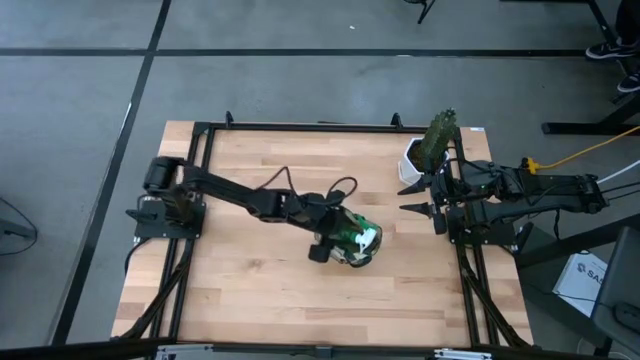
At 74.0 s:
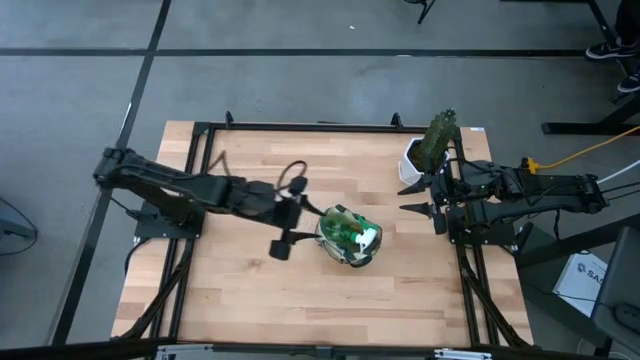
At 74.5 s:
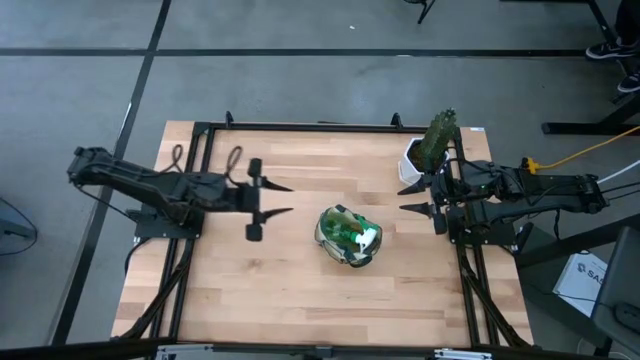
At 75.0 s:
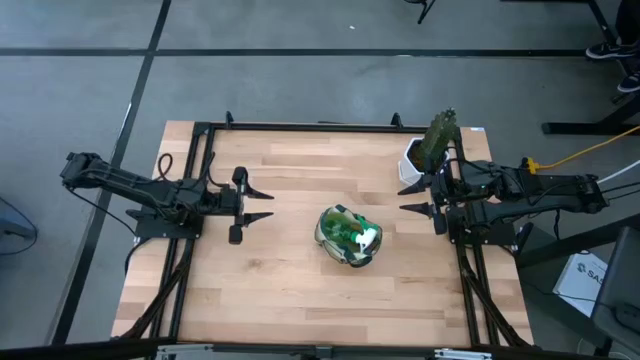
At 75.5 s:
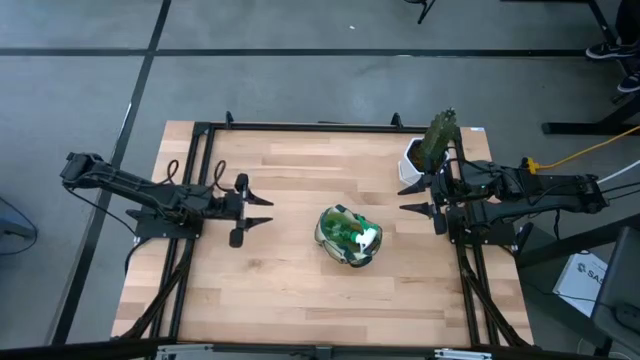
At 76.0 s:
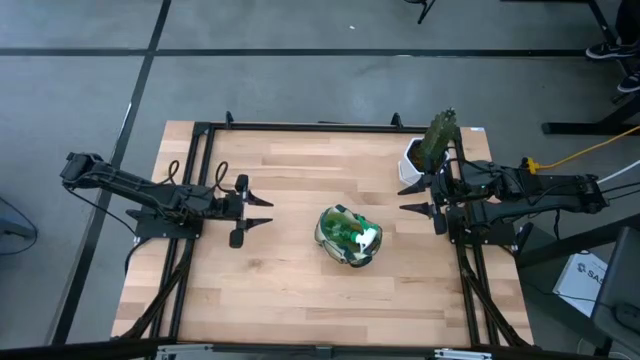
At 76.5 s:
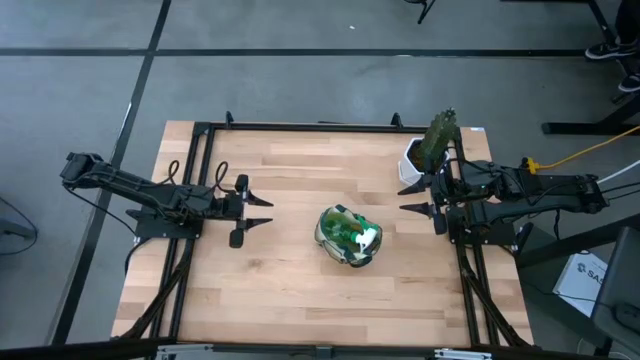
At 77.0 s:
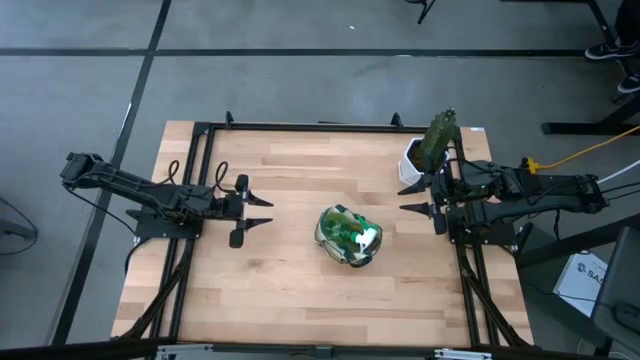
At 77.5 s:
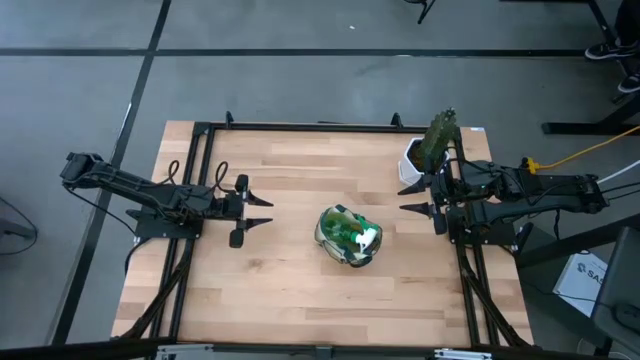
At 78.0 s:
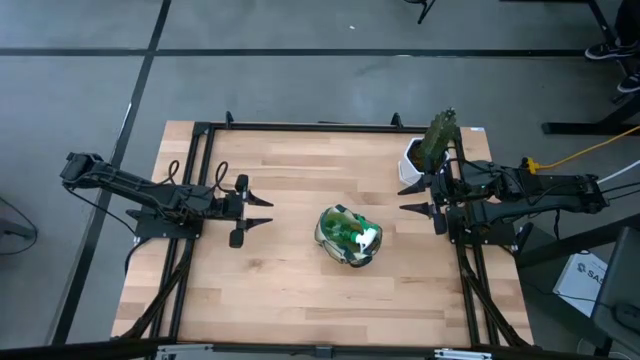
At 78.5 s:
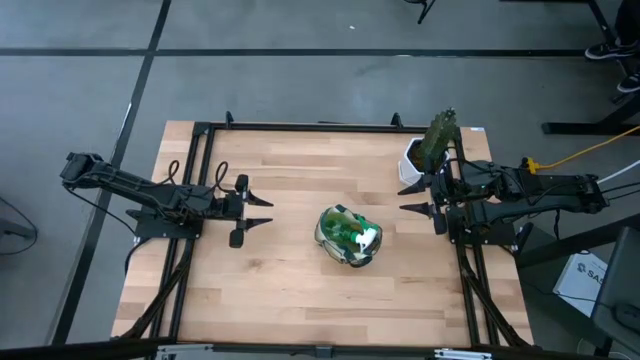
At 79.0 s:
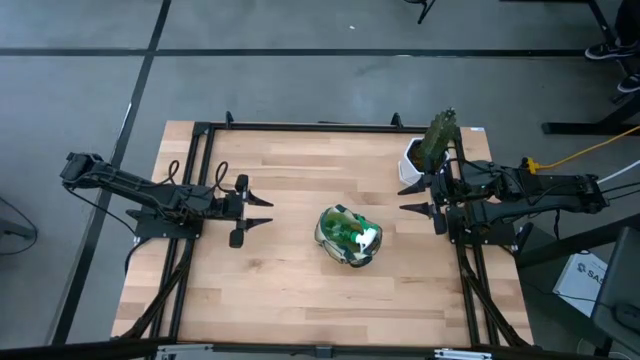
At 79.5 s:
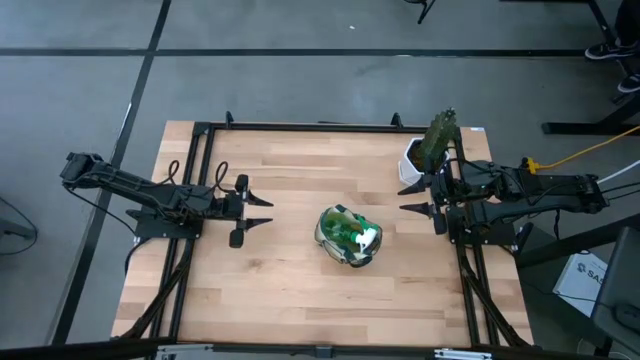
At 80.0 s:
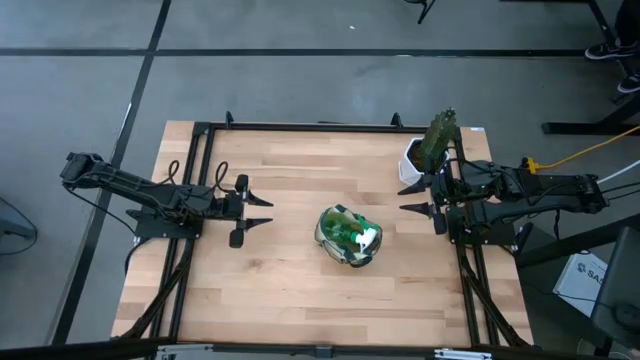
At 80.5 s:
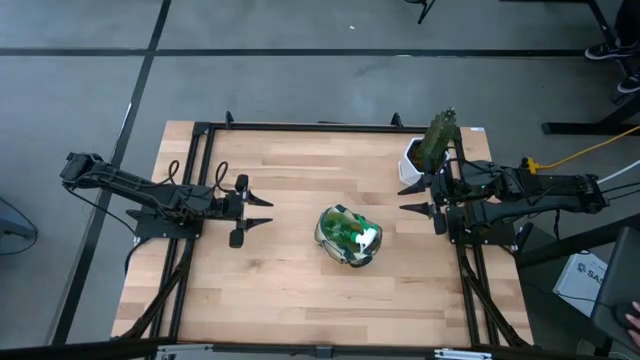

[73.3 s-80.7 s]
Task: Pick & Place Garden tools in Gardening bag
Return to Home Position

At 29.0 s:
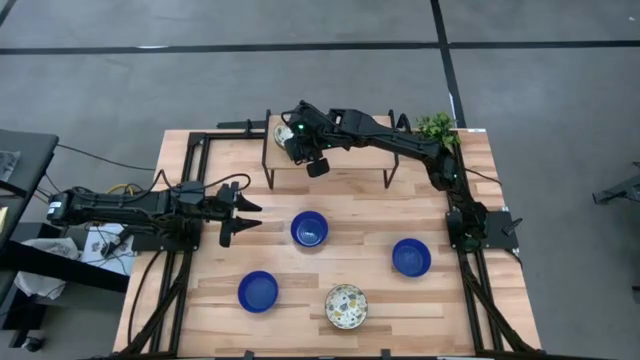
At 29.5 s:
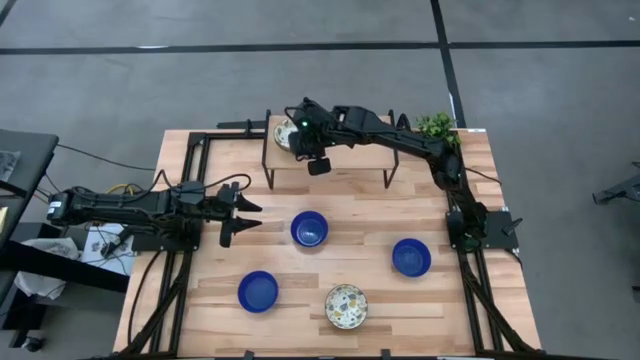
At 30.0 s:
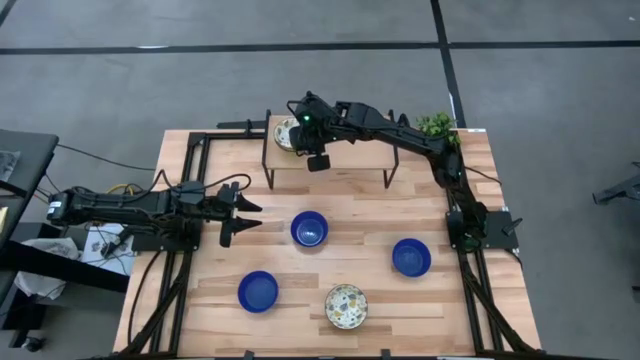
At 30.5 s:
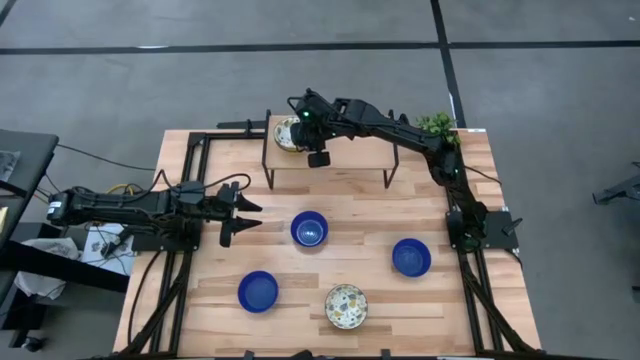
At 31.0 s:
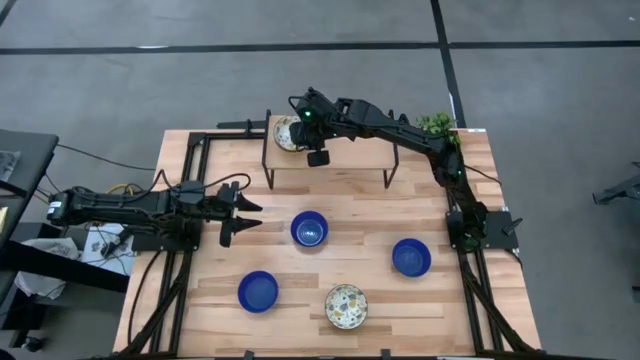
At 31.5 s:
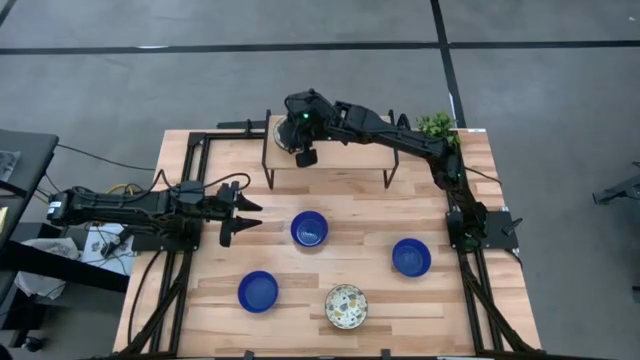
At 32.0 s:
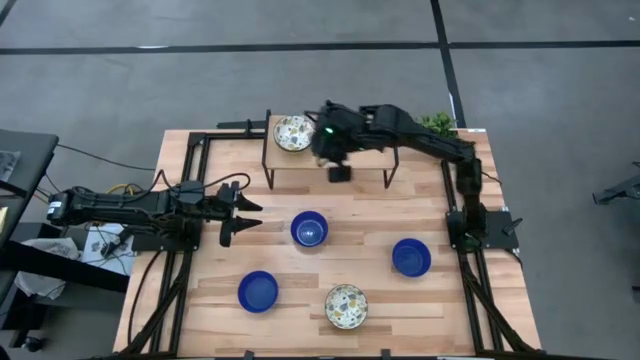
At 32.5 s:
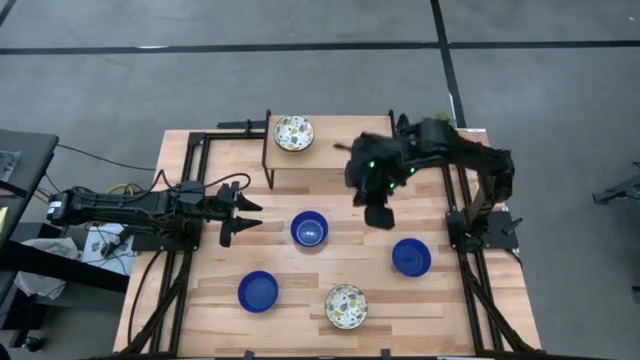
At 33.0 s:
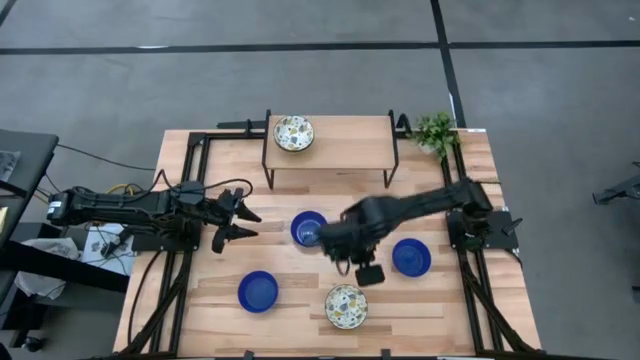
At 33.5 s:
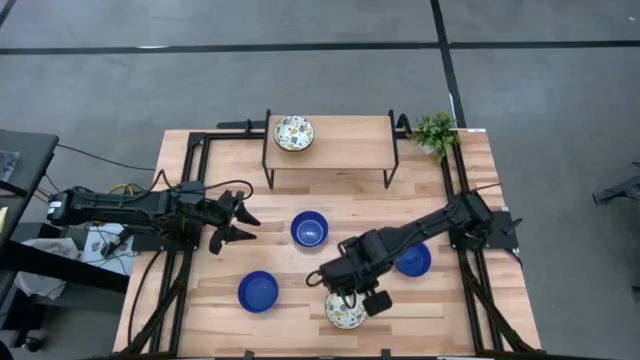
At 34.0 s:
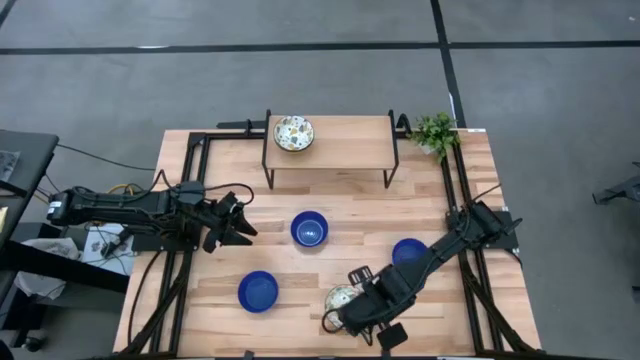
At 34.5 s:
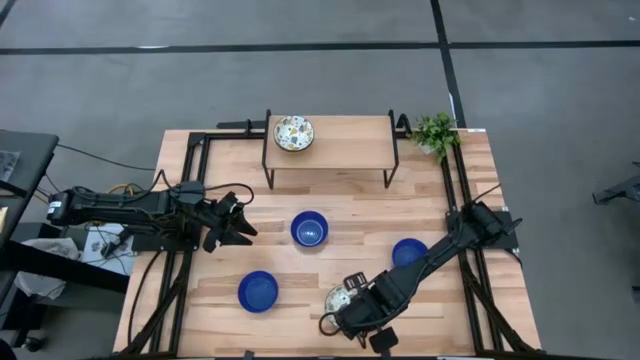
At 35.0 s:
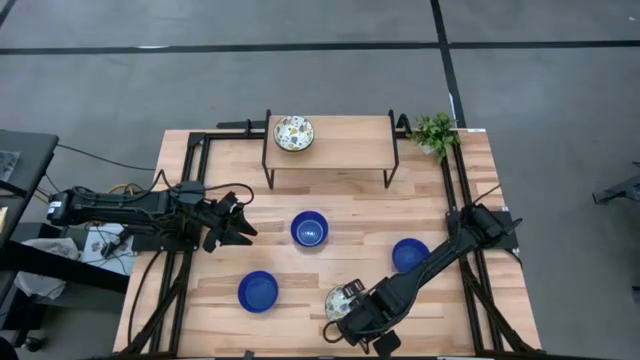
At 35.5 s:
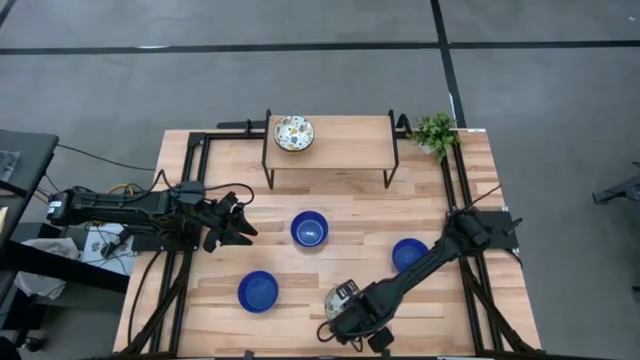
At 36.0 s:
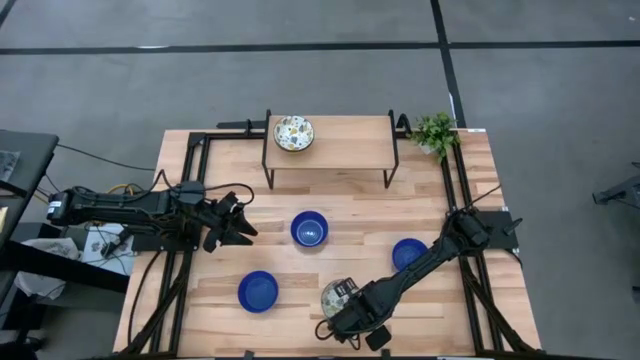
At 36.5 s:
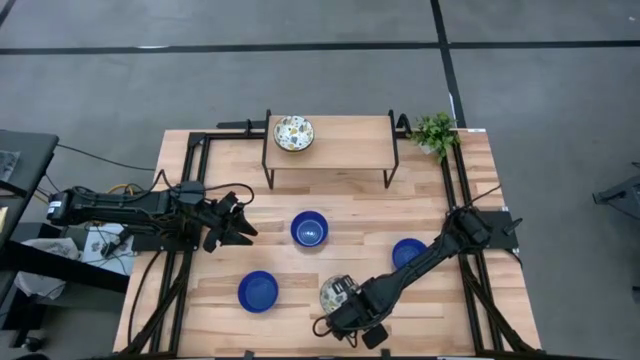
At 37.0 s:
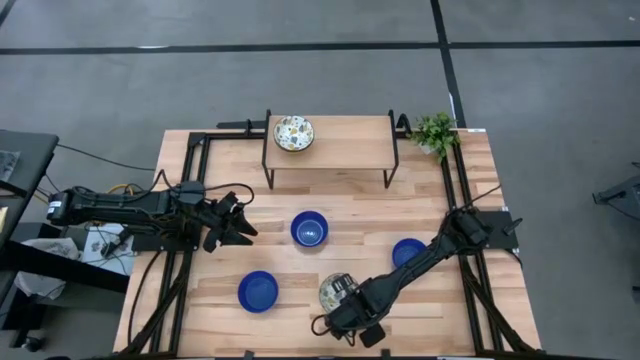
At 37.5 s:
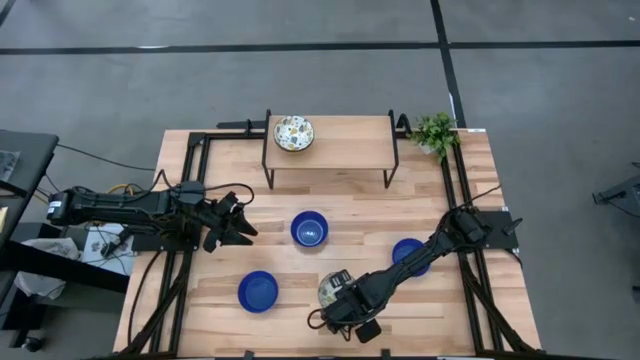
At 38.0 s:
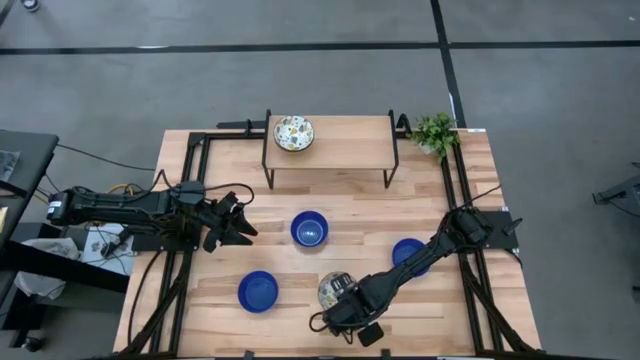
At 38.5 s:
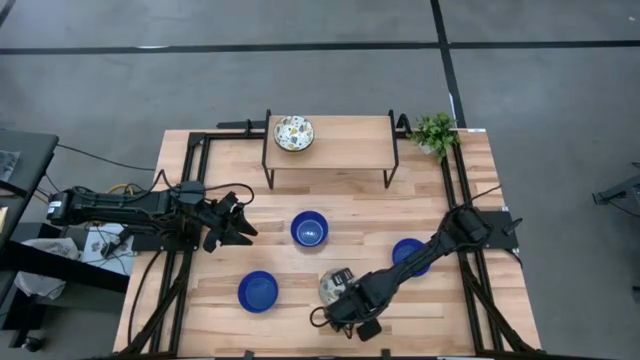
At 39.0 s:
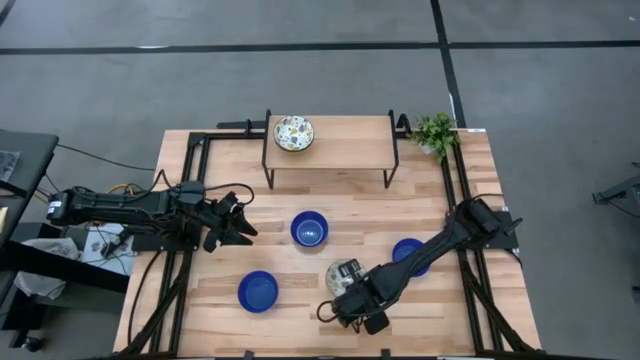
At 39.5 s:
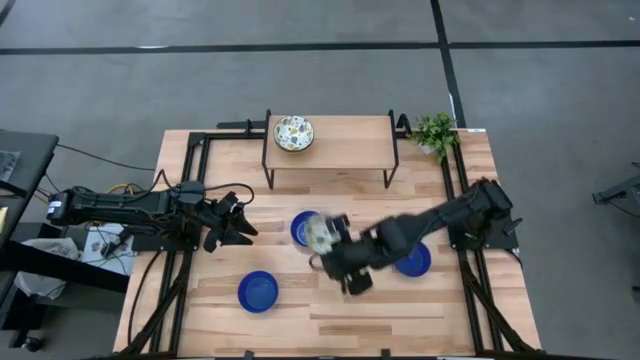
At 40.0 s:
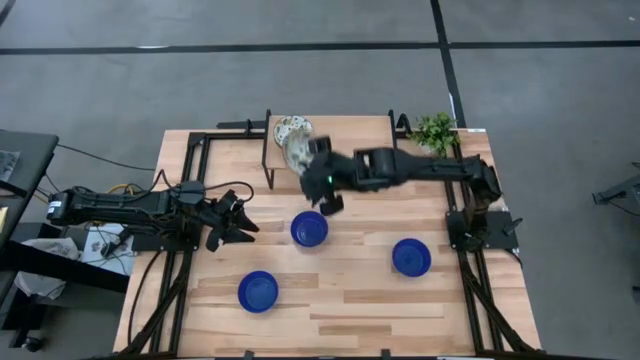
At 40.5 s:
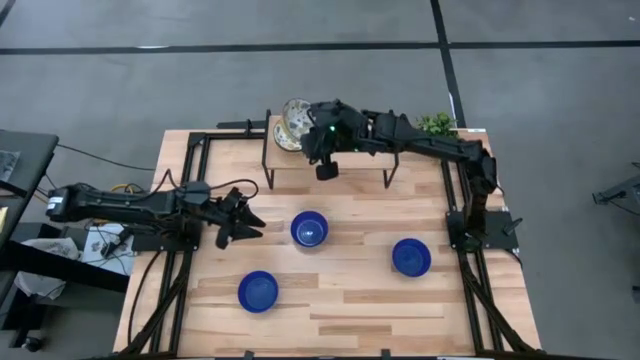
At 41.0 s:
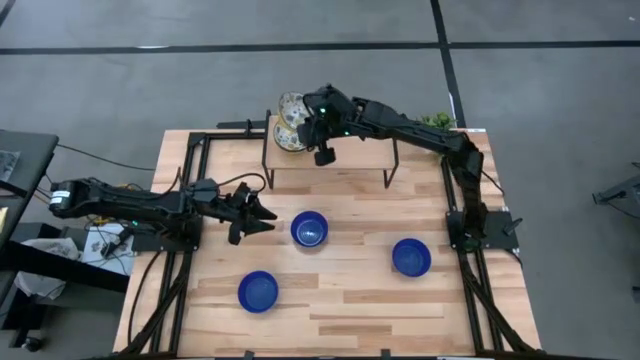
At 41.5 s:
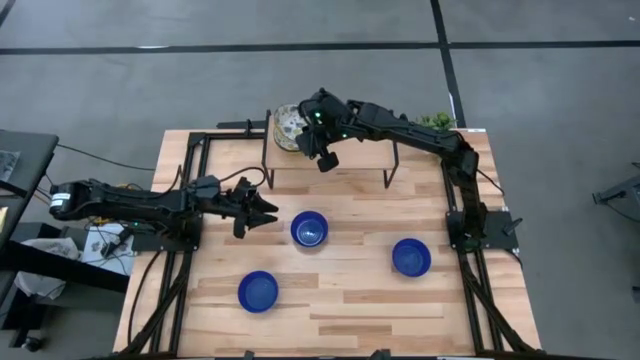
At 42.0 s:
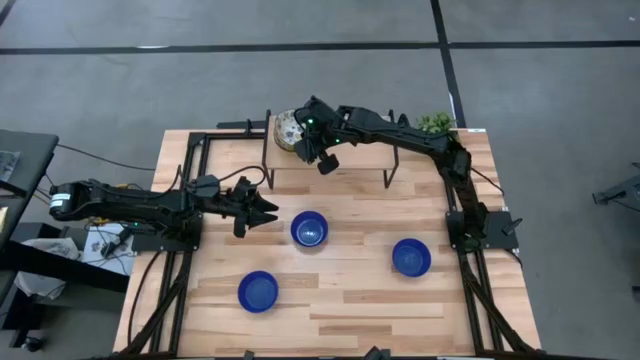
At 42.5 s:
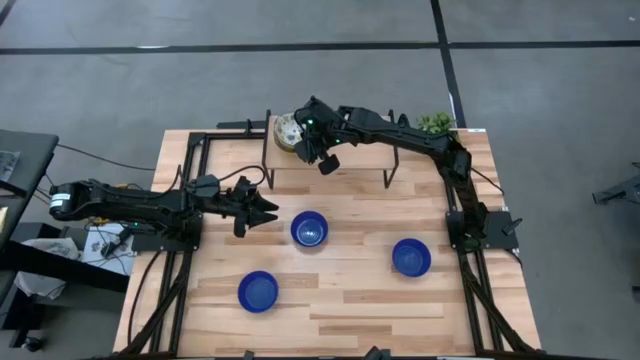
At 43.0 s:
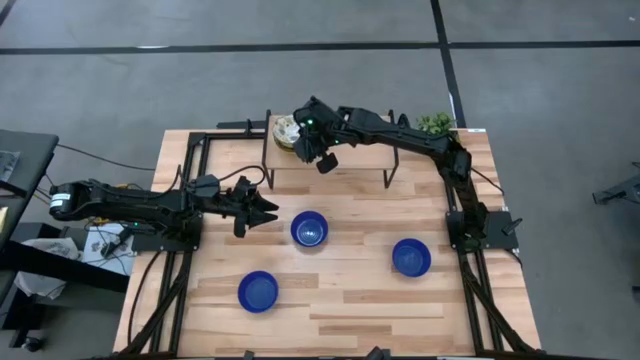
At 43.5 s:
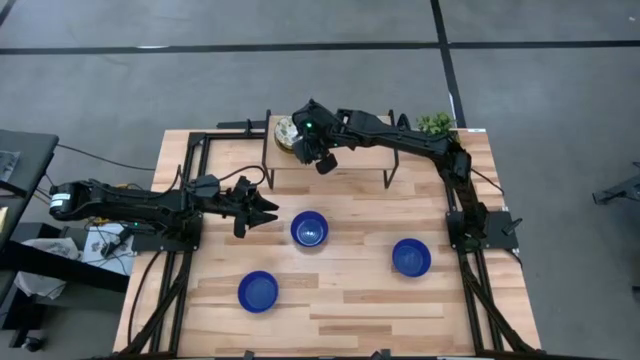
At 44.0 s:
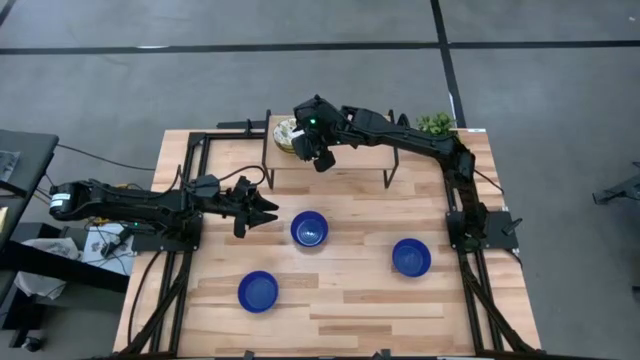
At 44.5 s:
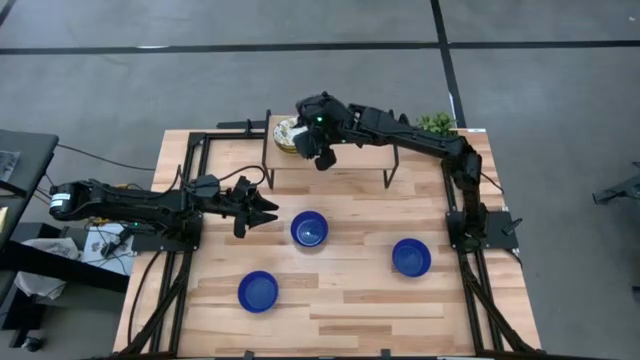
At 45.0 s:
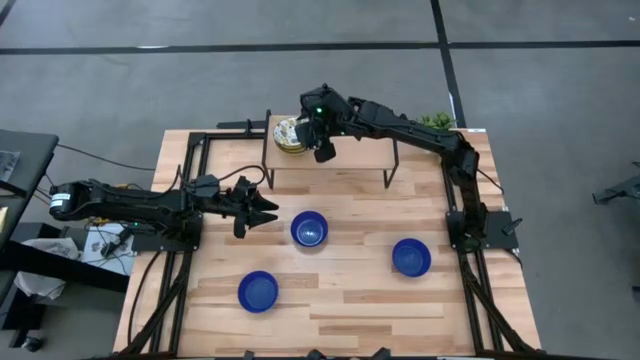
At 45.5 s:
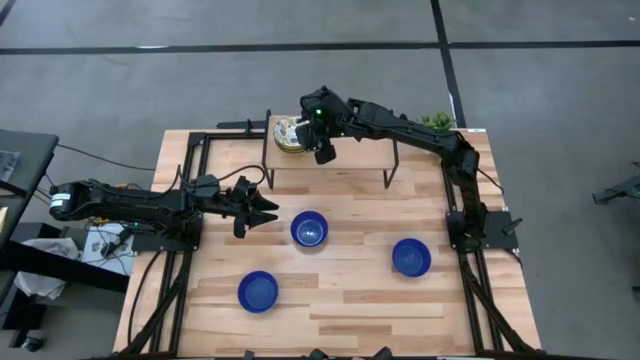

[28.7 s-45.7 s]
Task: Pick & Place Mini bowls
Stack the patterned bowl on top of the patterned bowl on the shelf
